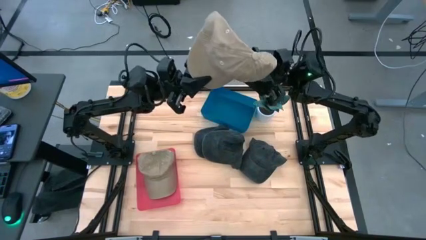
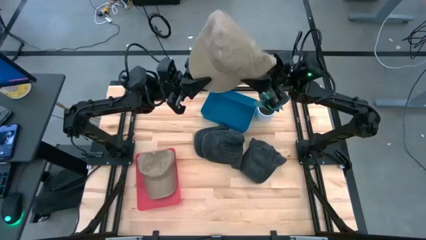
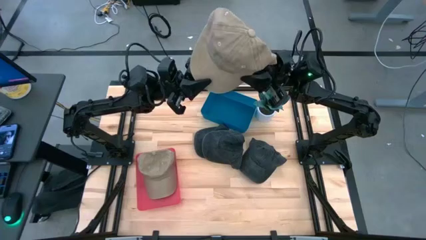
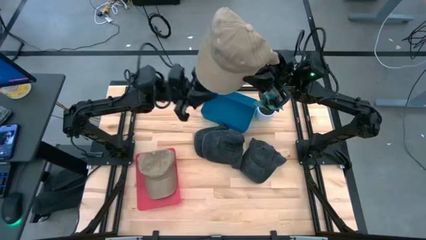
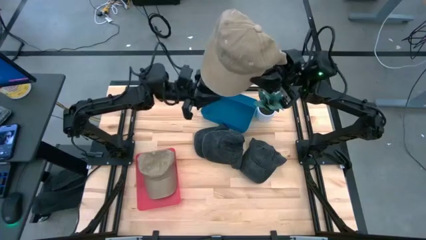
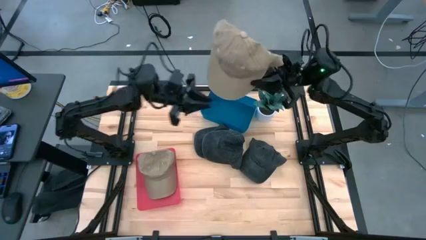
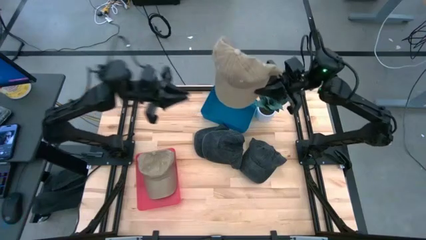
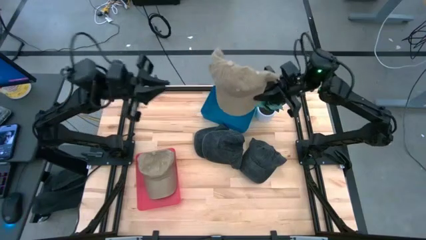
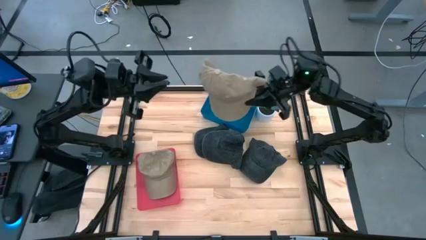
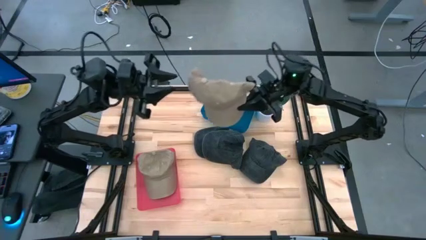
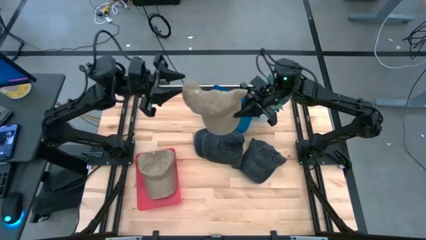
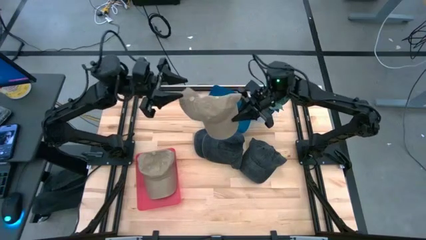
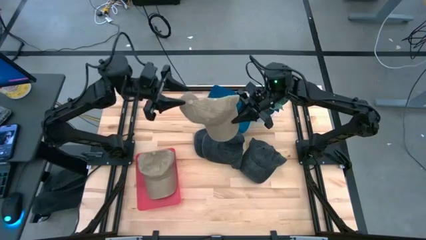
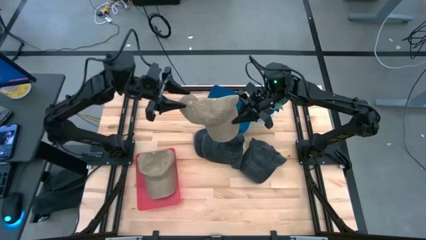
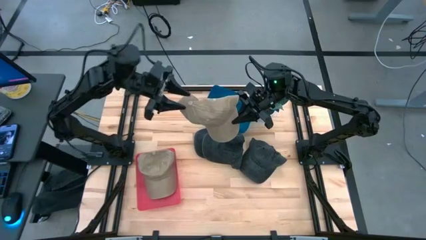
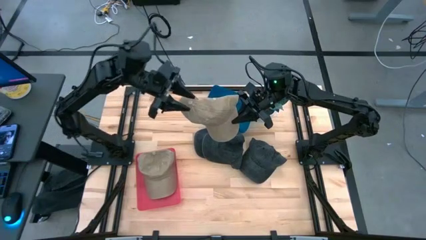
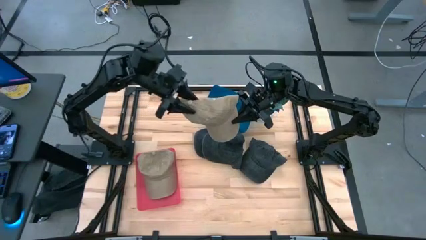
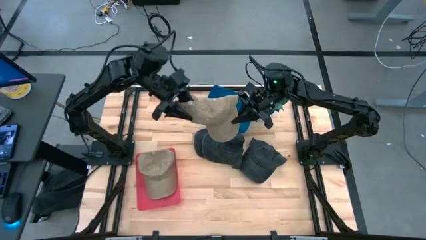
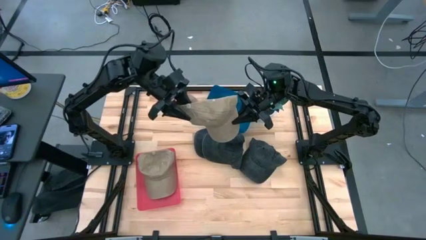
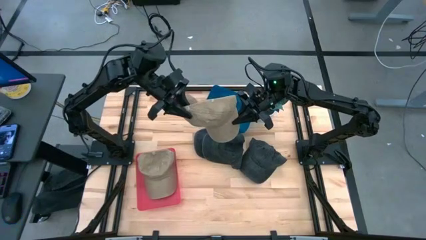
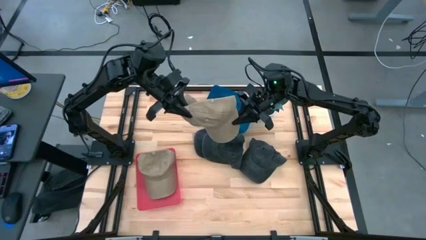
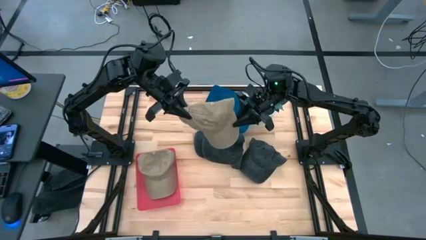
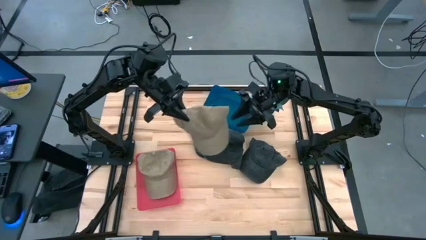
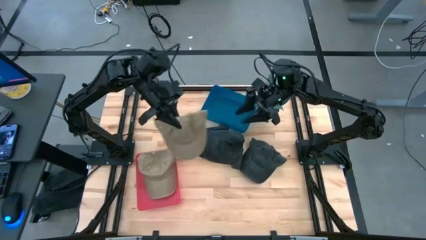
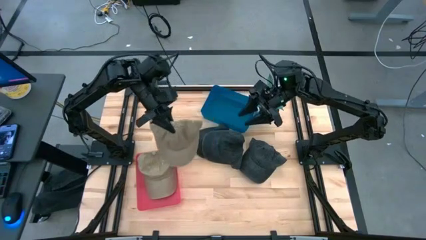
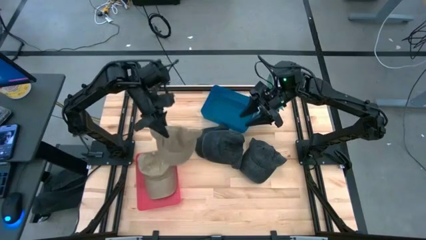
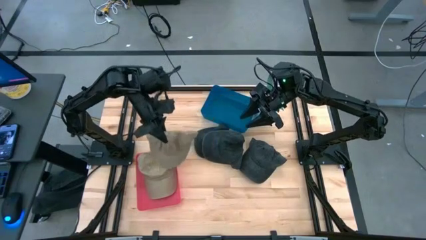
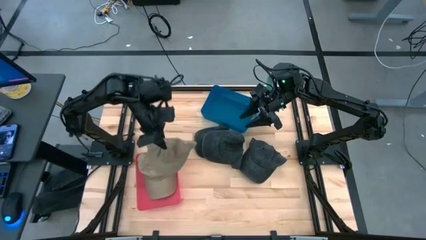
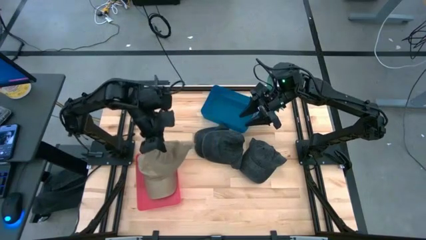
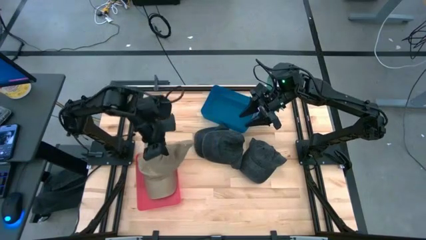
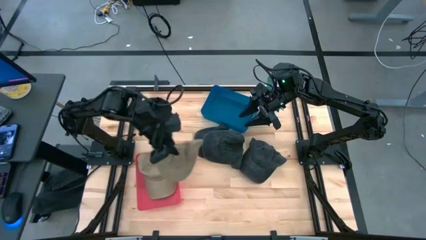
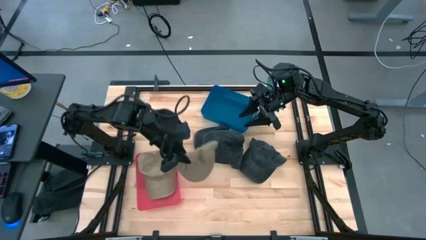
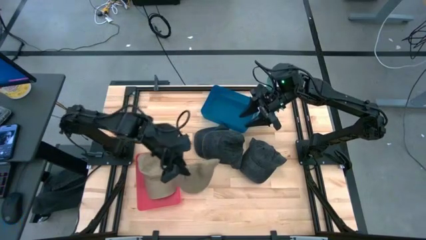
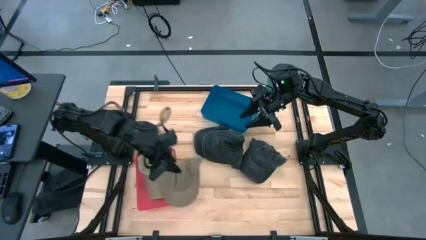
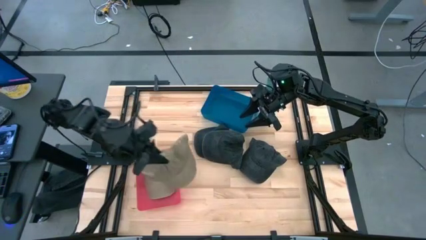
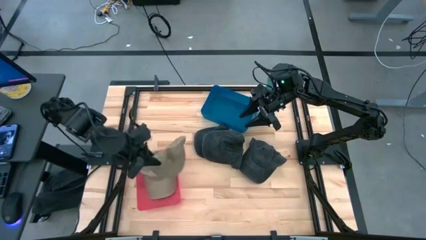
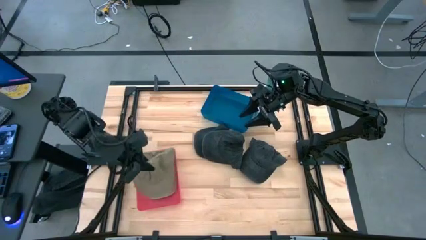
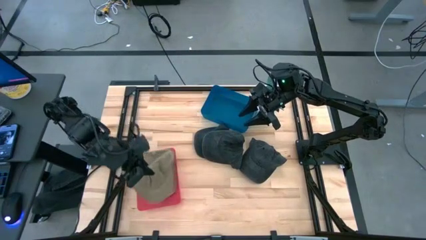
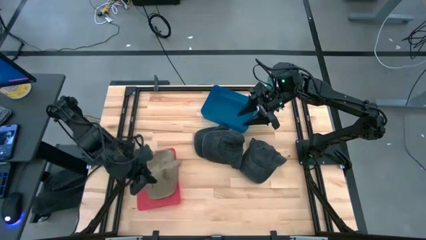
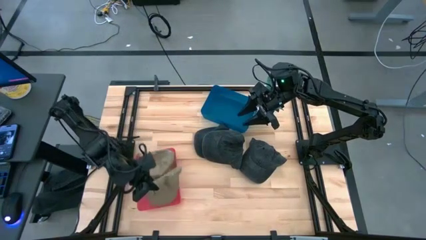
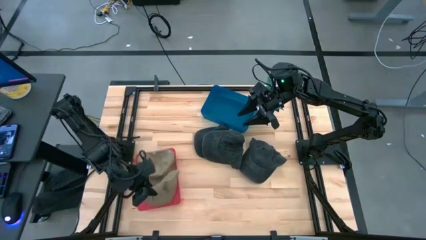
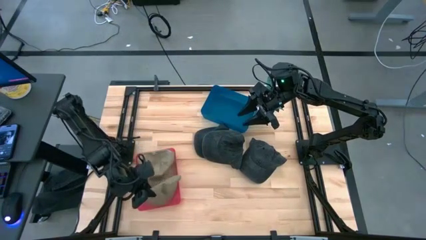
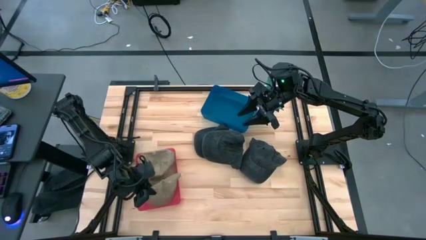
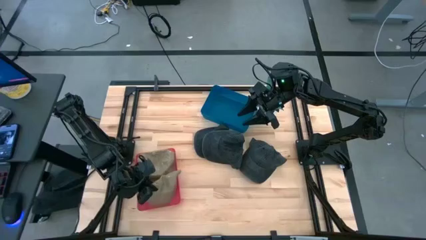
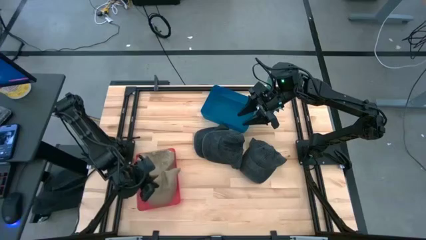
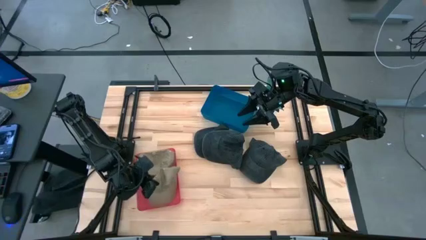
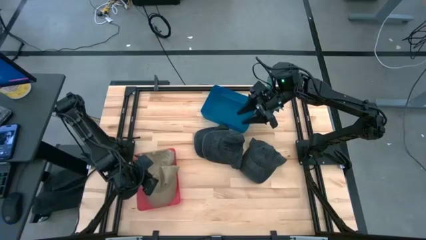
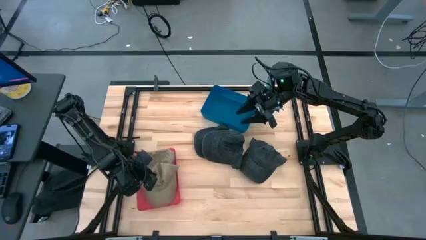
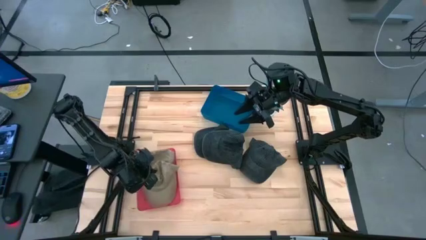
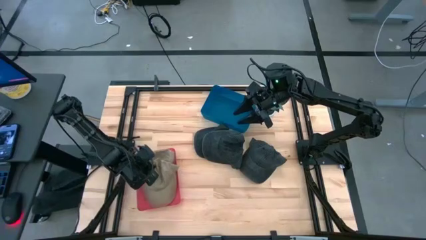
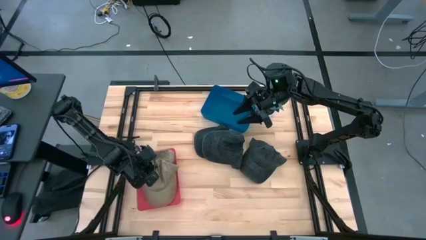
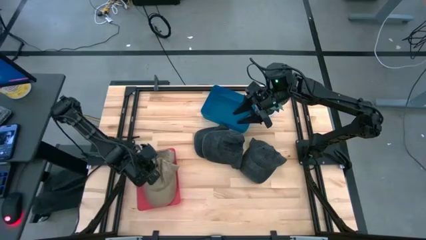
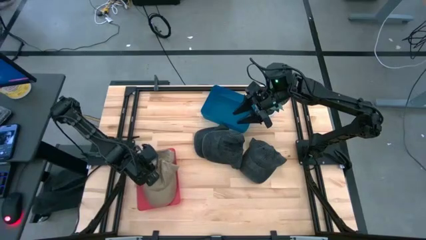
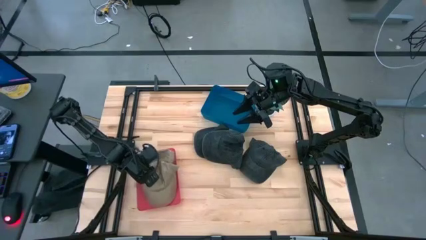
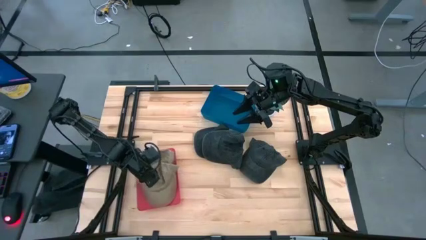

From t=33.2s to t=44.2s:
Task: Pick & Place hat
Put the brown cap into the red bin

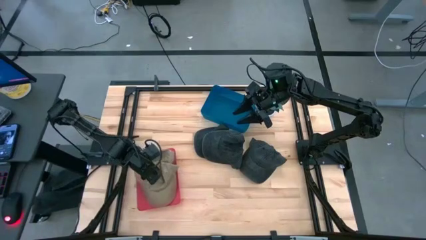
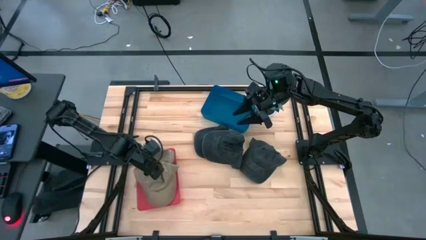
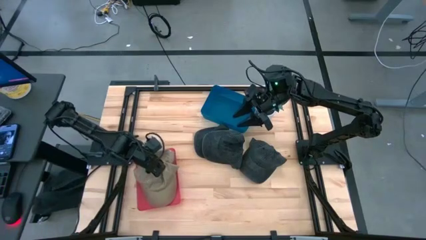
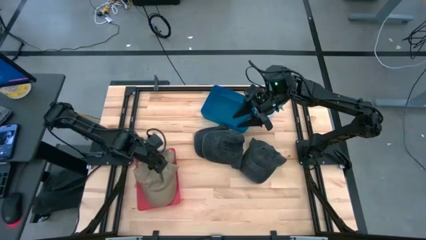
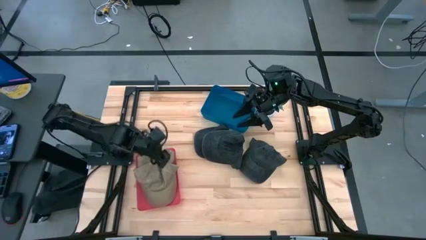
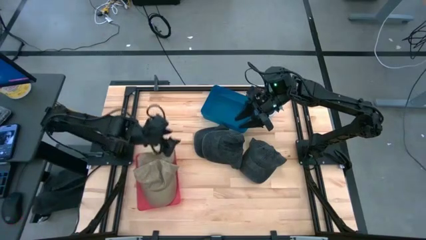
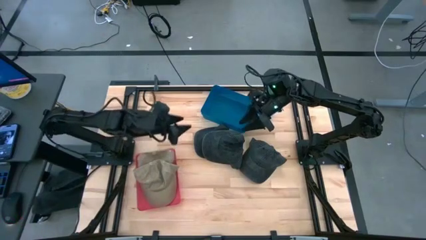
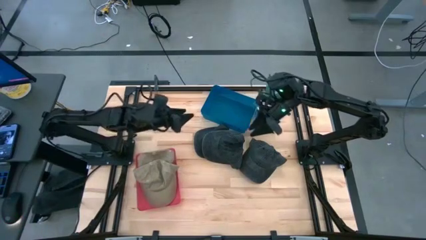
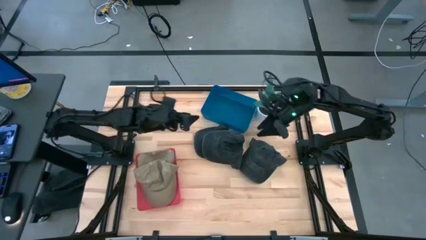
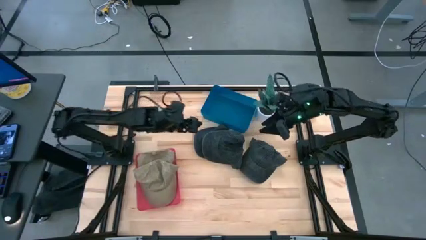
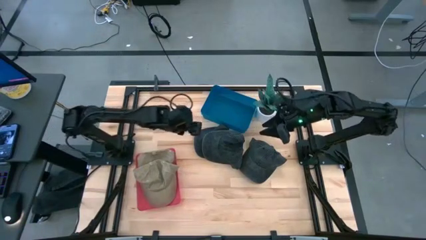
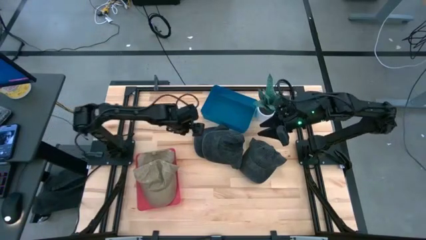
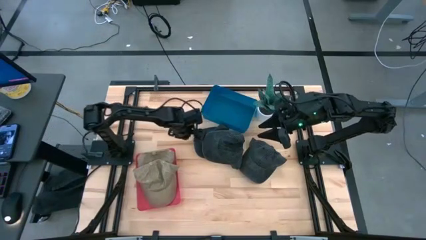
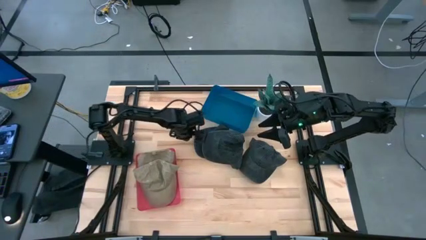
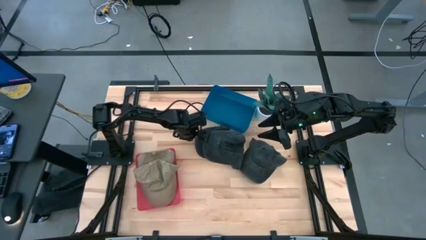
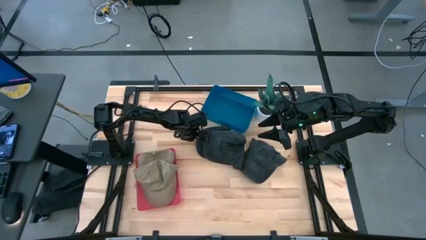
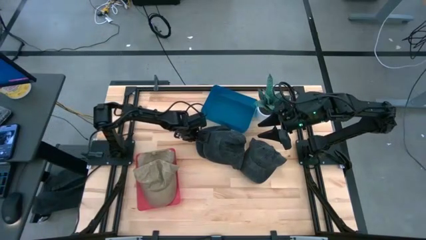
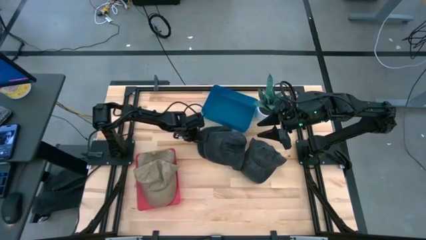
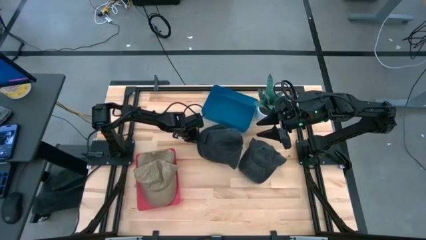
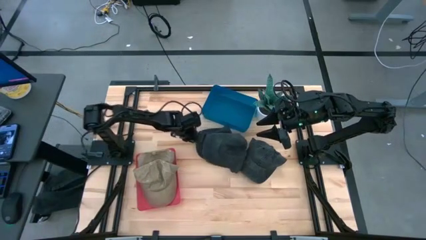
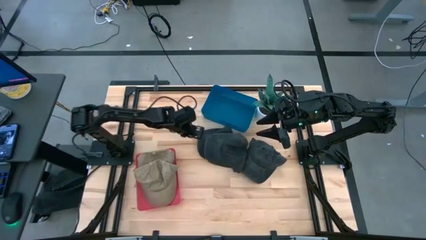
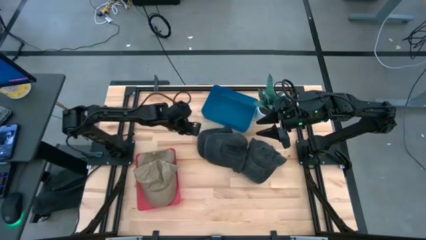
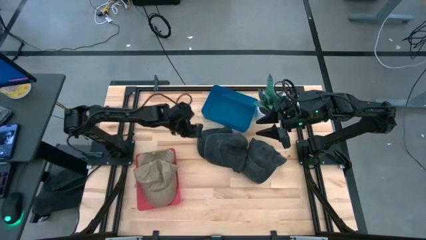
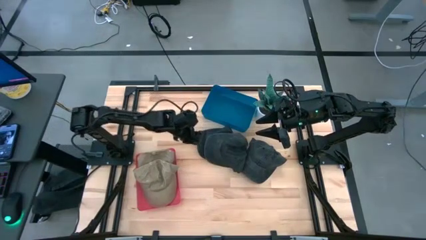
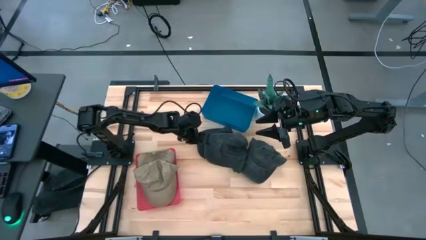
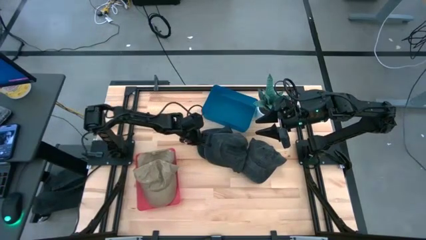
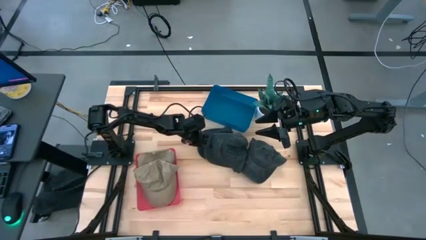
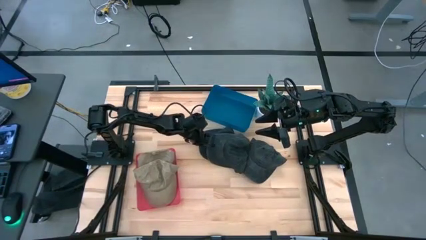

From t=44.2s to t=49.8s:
Put the left black cap into the blue bin
